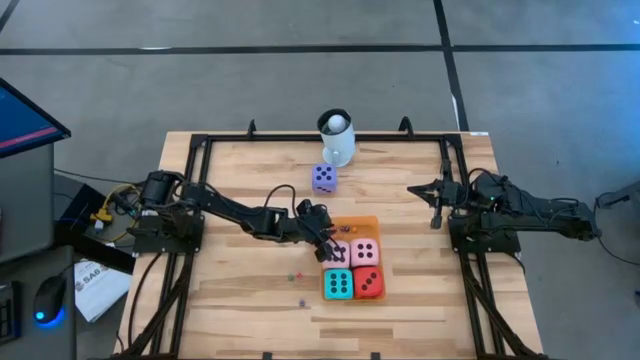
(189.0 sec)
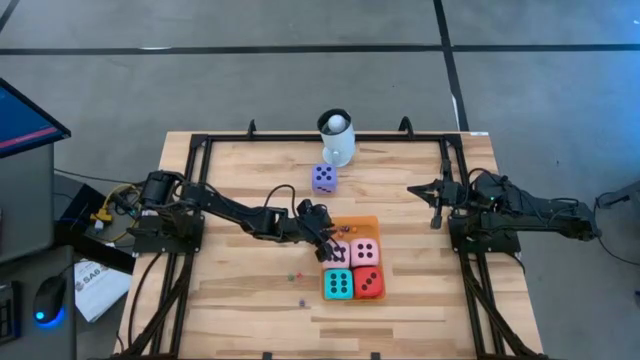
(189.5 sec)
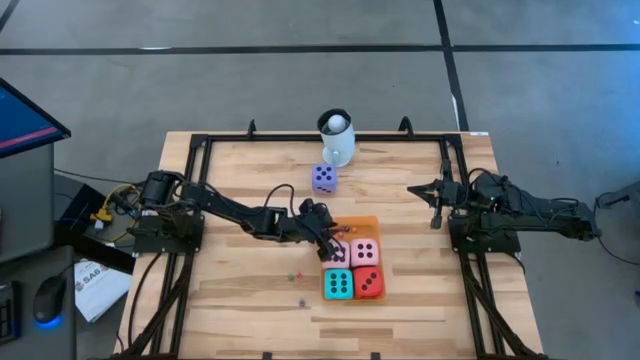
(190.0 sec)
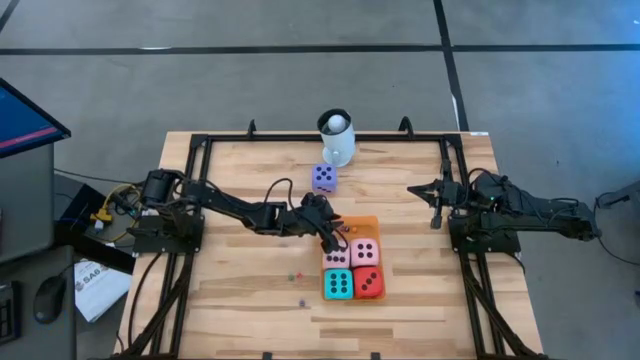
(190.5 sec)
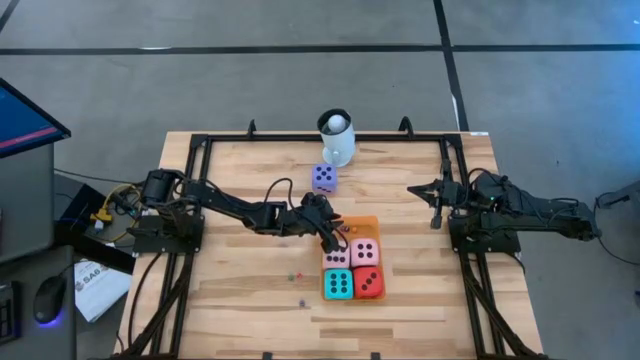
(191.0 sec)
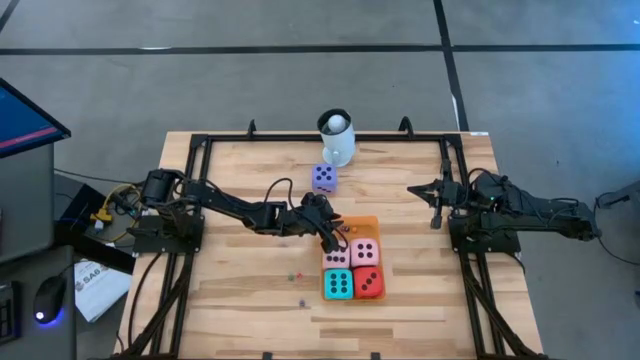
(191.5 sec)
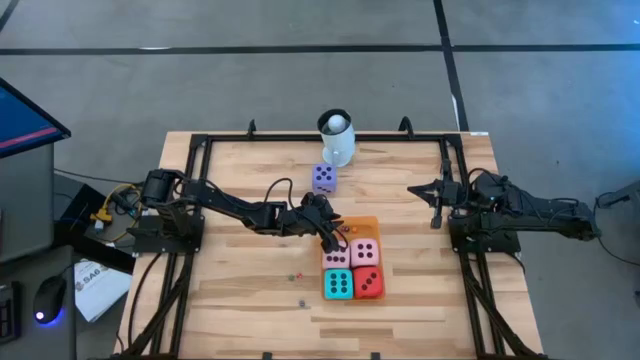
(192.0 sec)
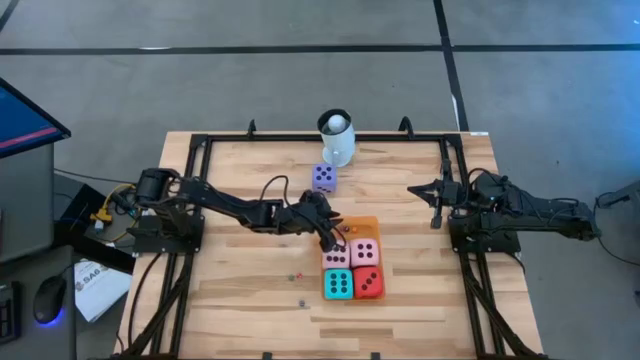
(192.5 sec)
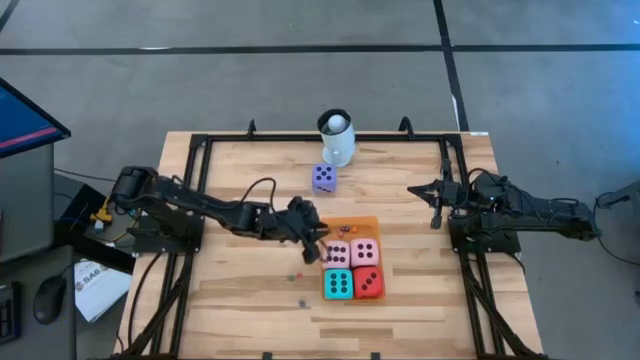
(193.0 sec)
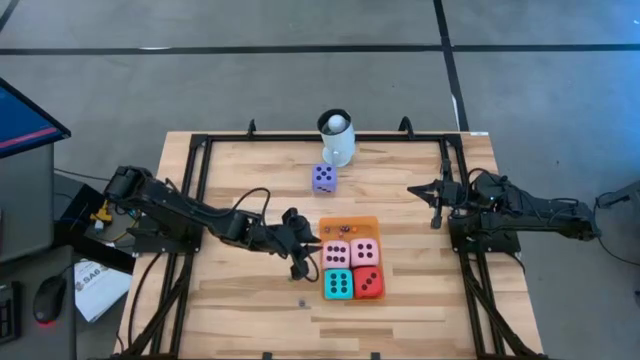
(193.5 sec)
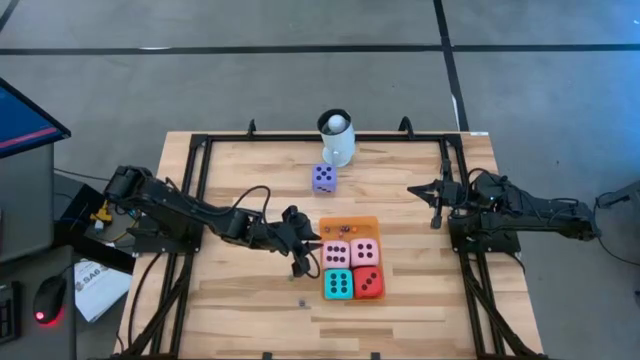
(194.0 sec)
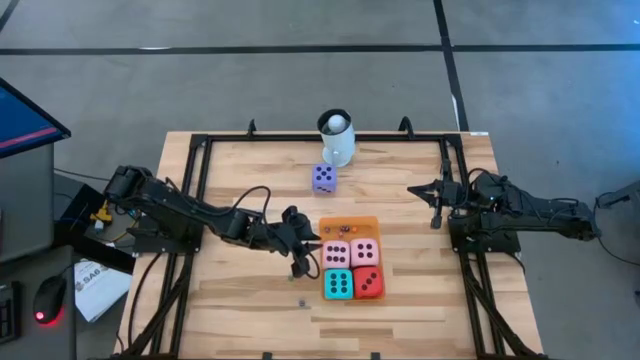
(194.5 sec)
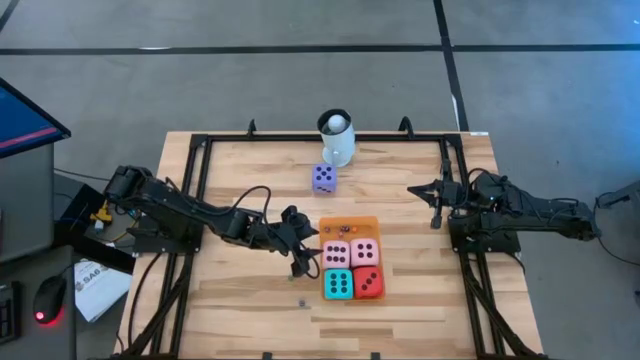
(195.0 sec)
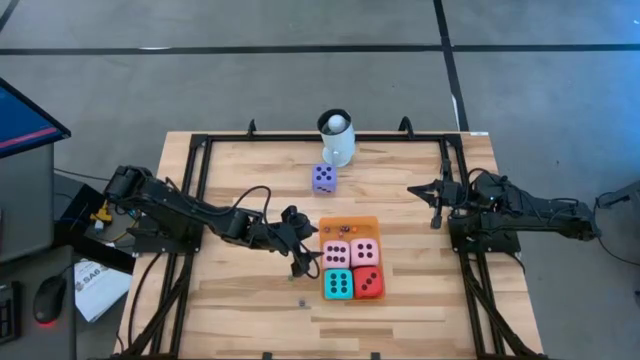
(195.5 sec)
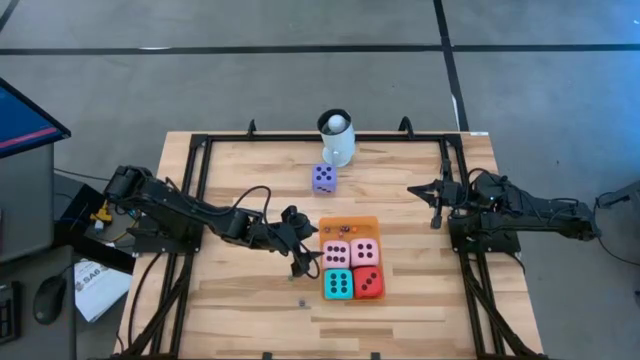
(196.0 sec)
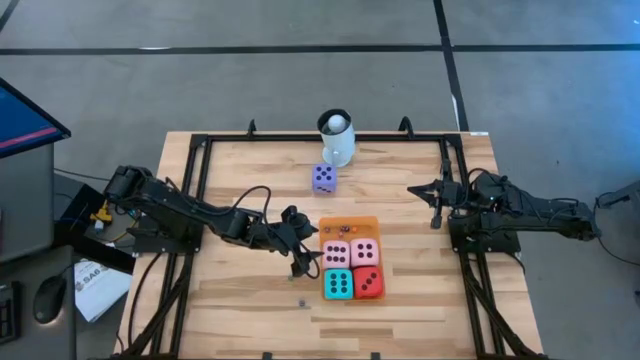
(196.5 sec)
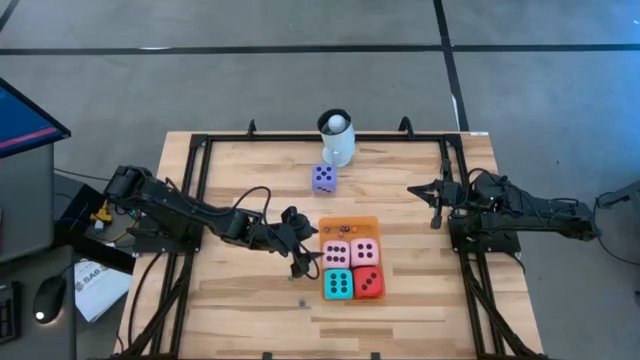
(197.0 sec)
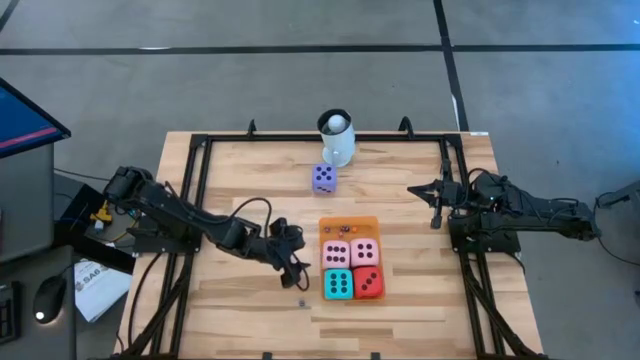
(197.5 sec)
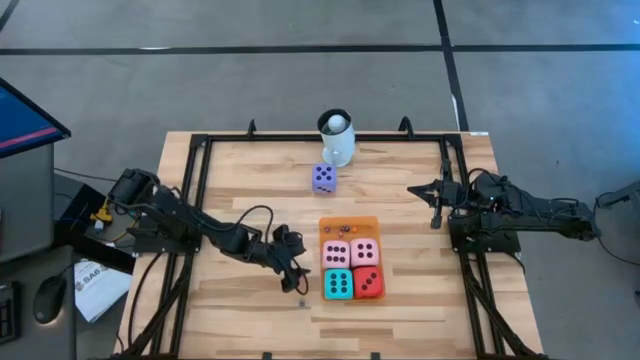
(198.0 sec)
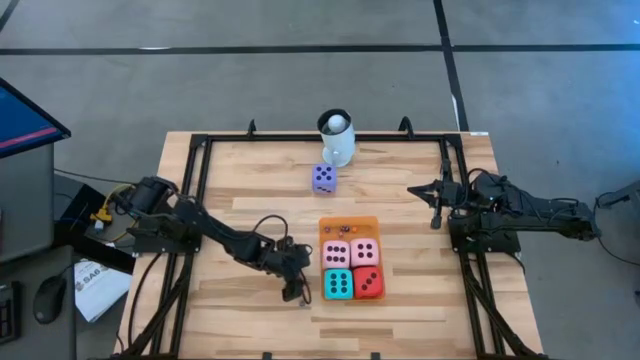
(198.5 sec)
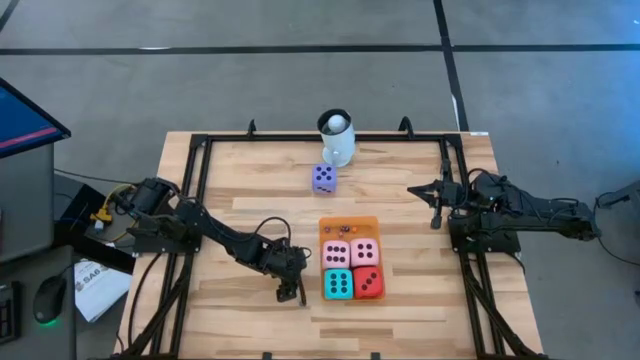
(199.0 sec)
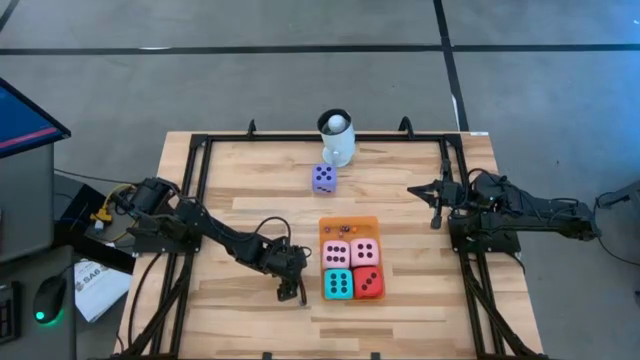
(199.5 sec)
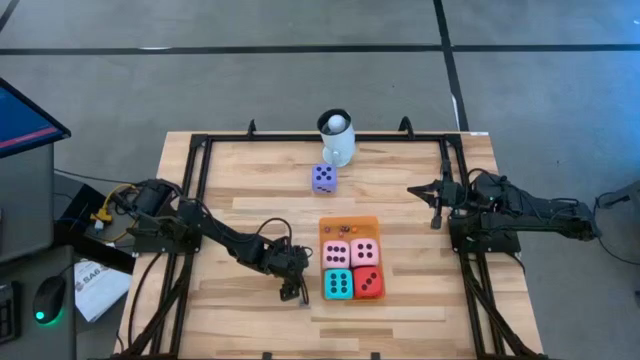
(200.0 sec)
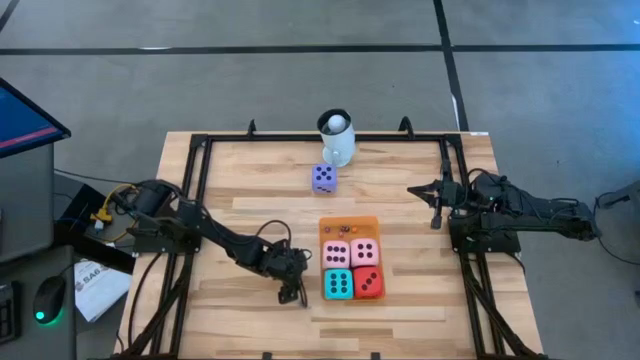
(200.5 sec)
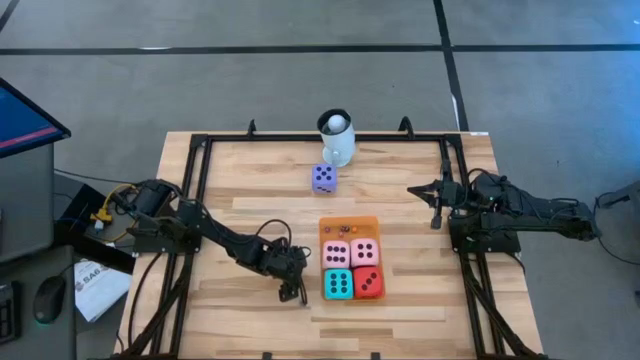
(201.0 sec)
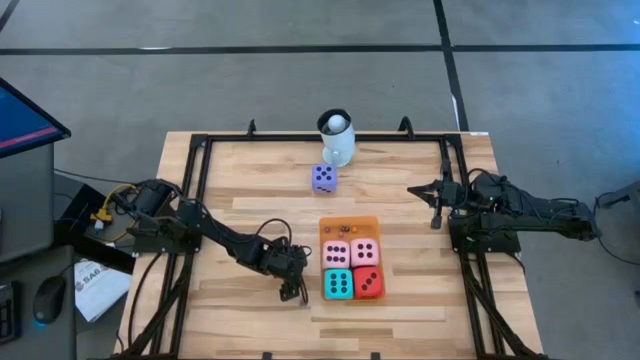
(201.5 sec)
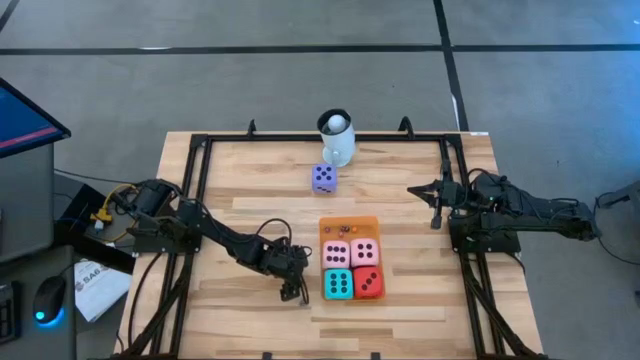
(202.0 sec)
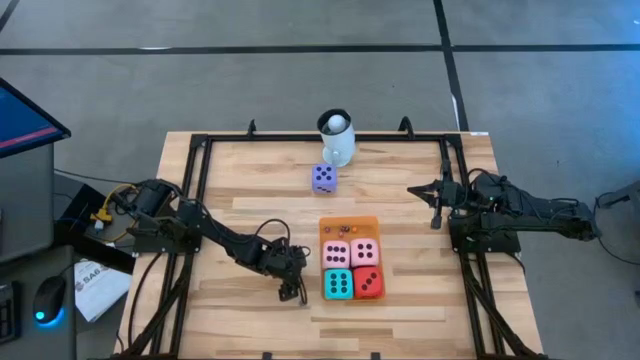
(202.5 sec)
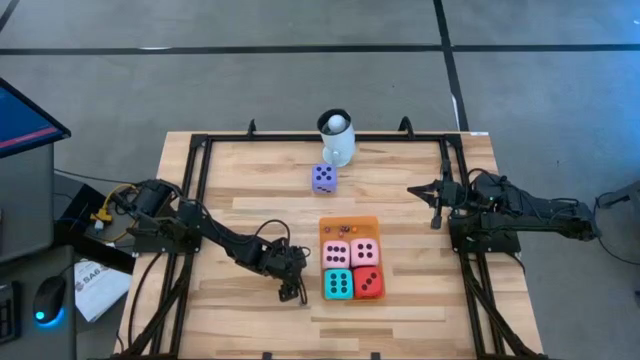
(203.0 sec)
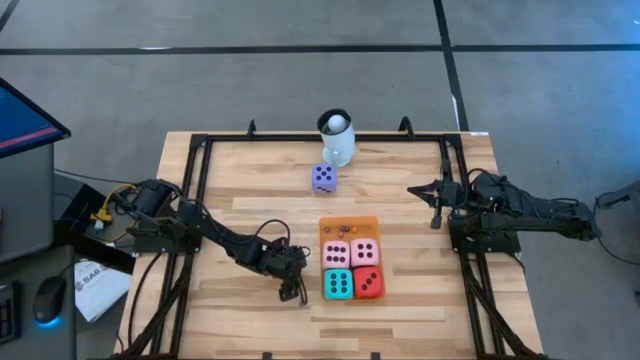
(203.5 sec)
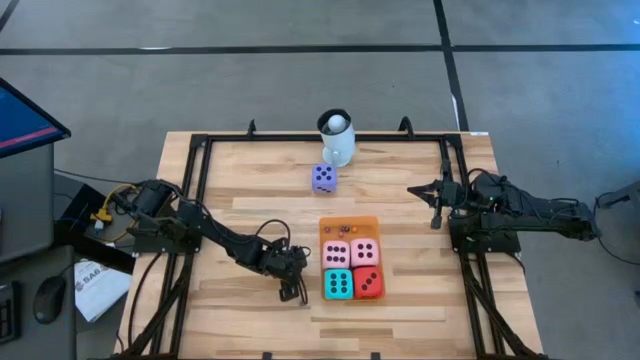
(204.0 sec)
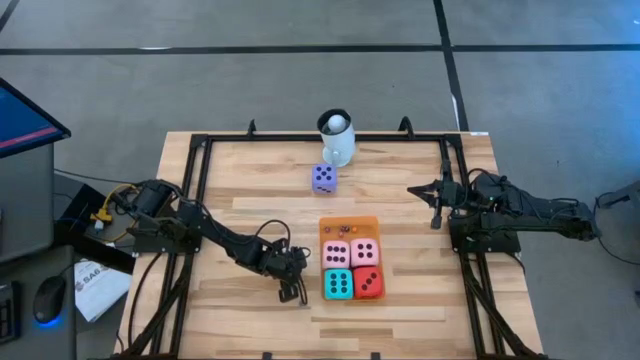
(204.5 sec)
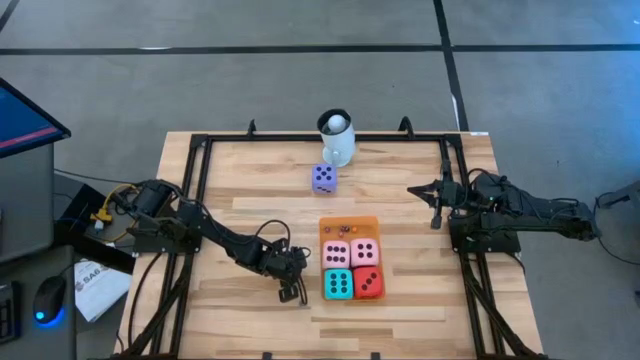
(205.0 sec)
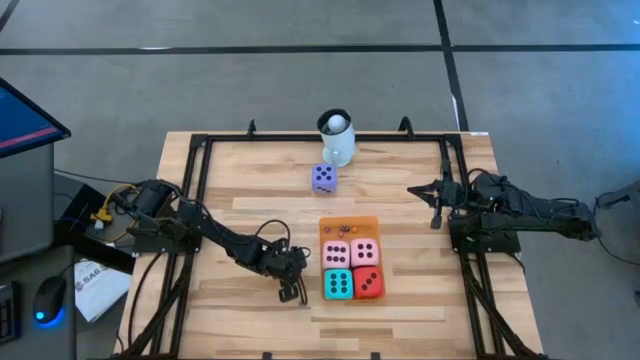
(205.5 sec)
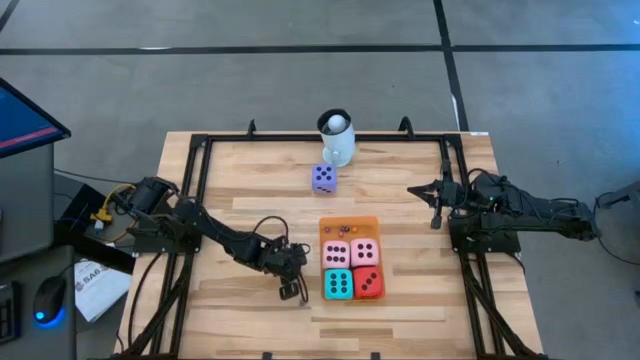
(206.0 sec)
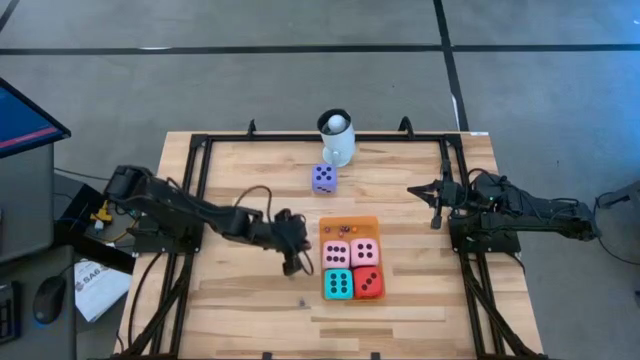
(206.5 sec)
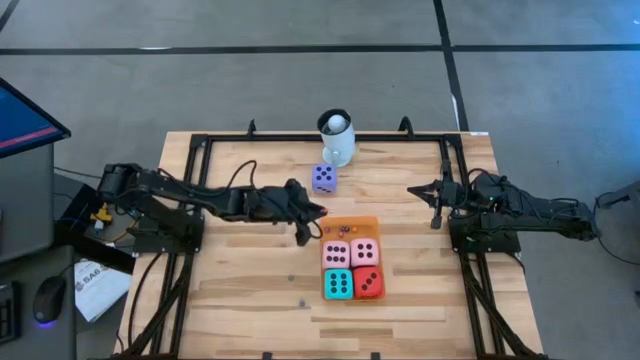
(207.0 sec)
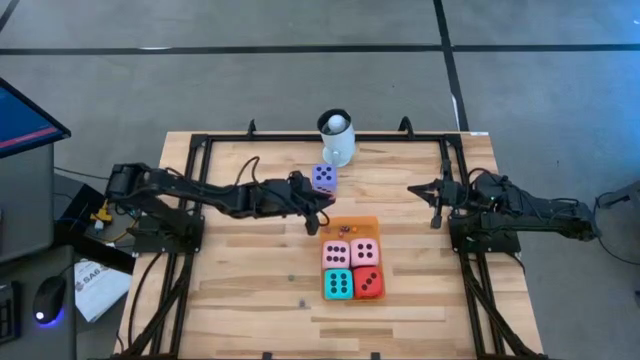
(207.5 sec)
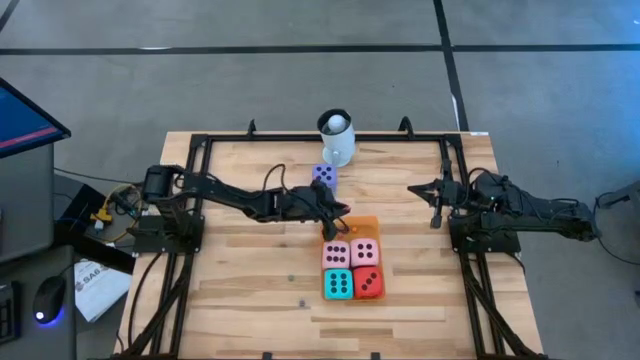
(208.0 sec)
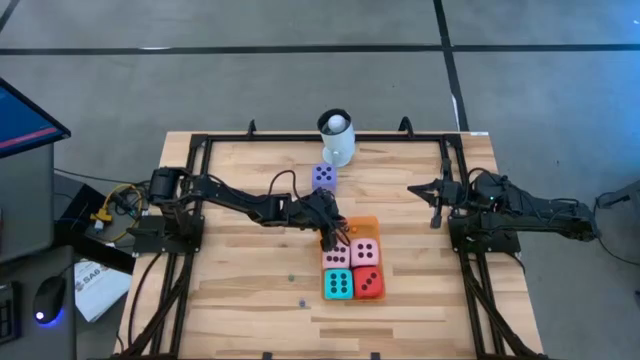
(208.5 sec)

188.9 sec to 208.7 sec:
Task: Pick & Place Dice
Put the small pink dice into the orange bin

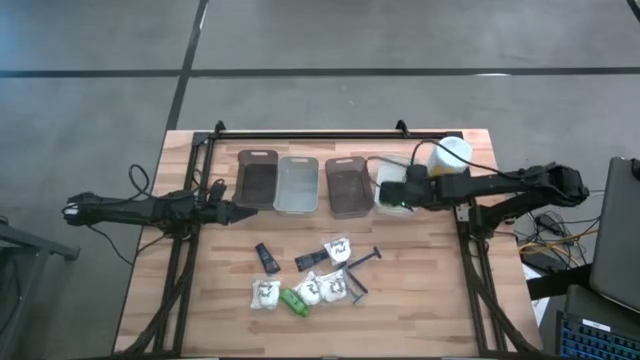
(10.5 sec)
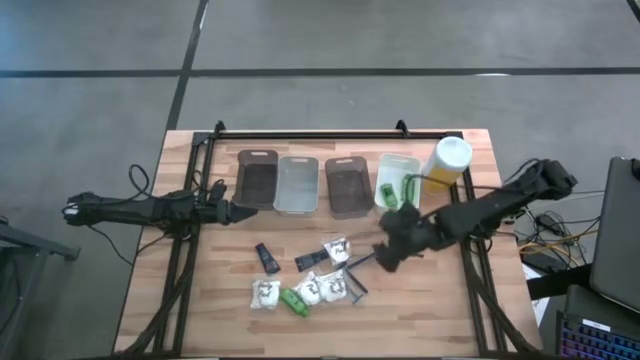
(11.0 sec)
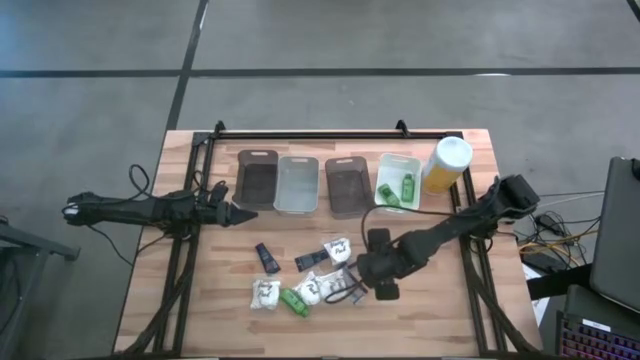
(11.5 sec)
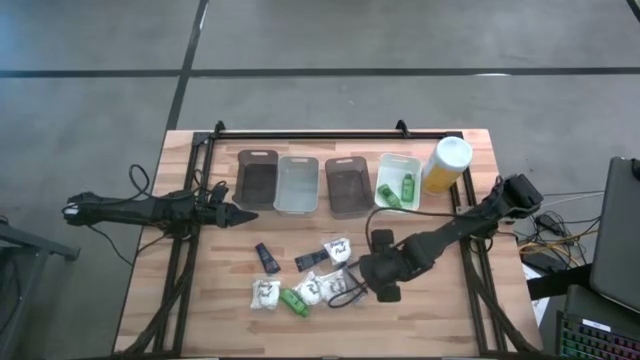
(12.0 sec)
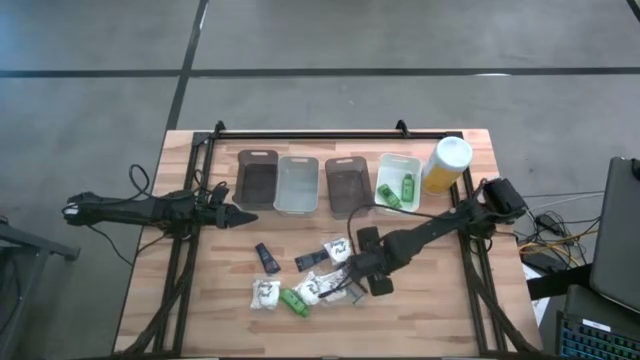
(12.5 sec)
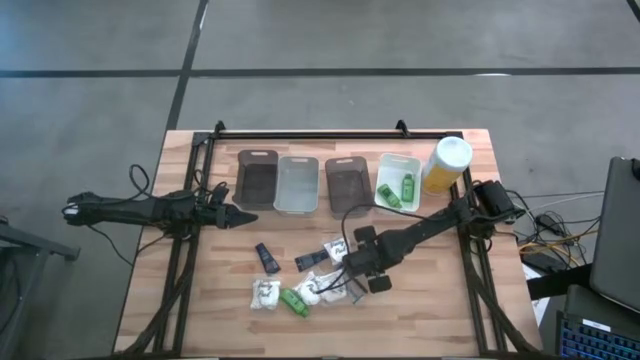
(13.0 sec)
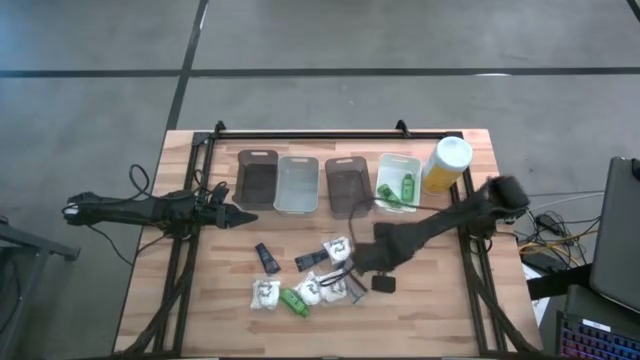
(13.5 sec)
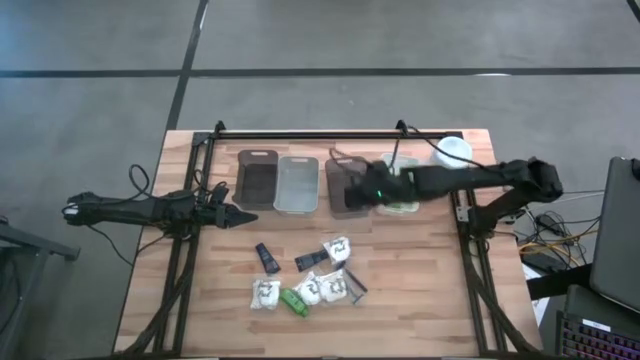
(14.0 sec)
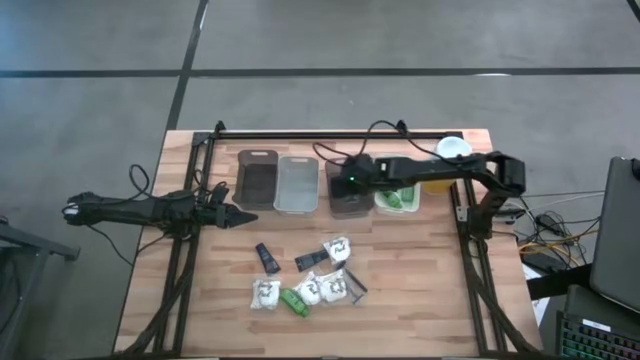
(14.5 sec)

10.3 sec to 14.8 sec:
Task: Pick & Place Travel size toiletries
Put the blue razor into the right black bin
